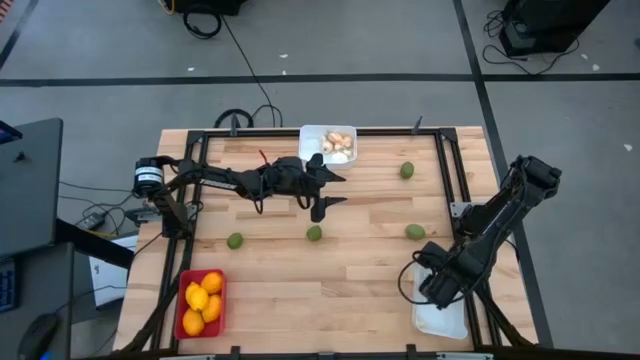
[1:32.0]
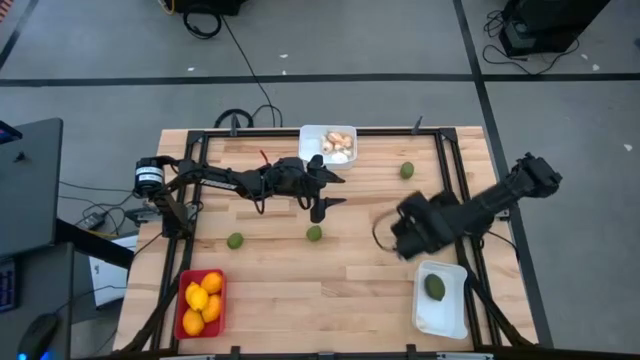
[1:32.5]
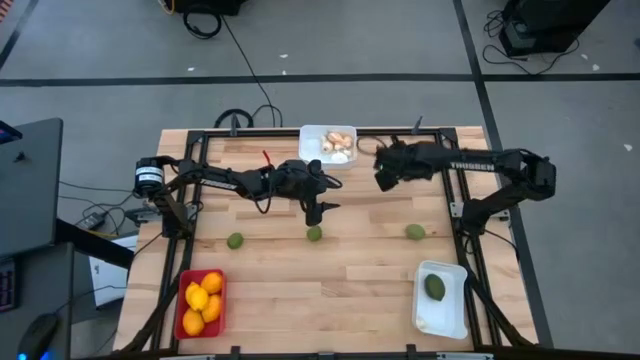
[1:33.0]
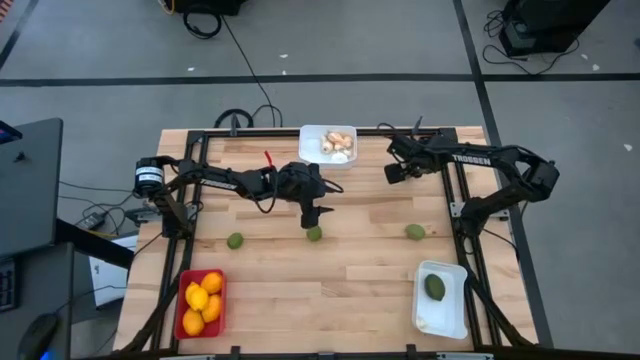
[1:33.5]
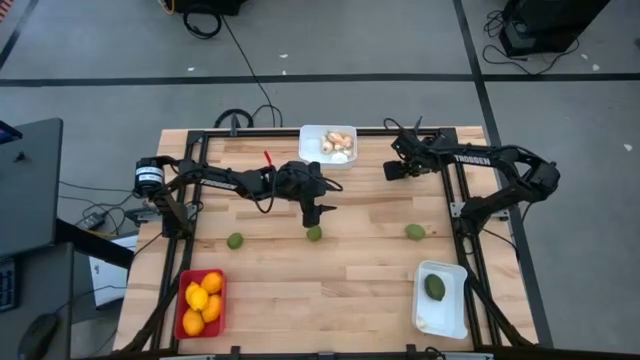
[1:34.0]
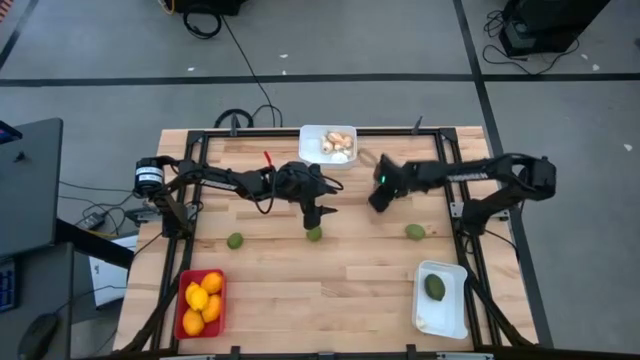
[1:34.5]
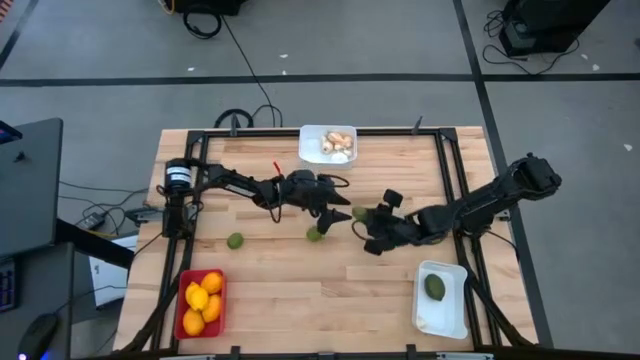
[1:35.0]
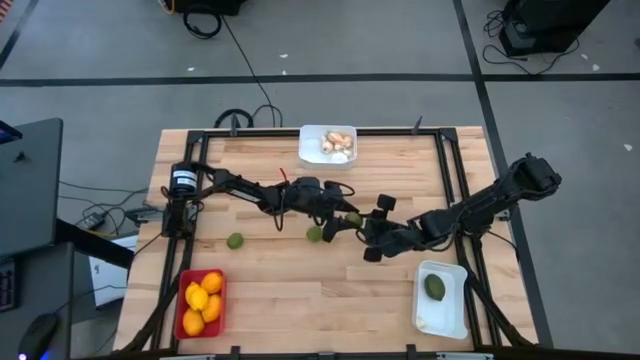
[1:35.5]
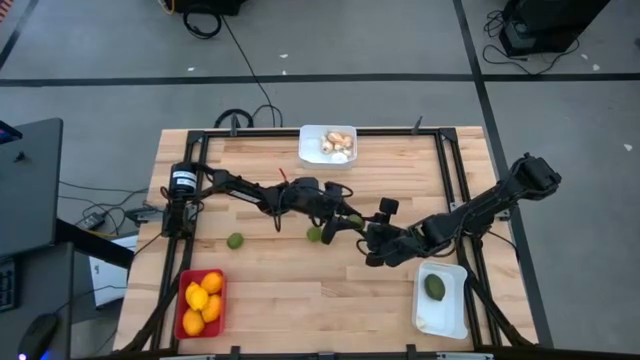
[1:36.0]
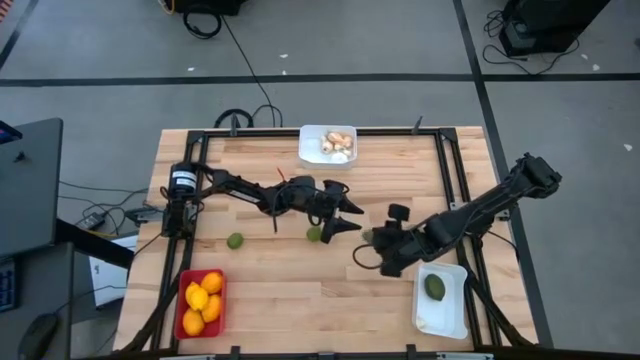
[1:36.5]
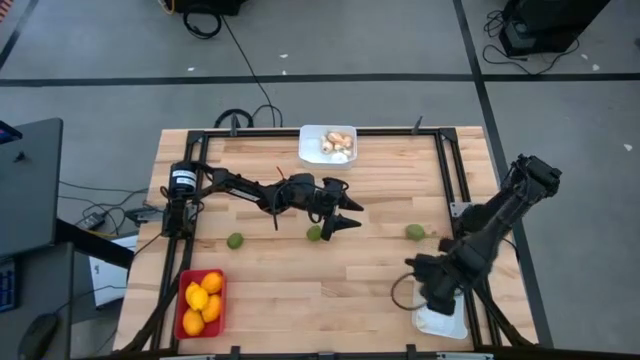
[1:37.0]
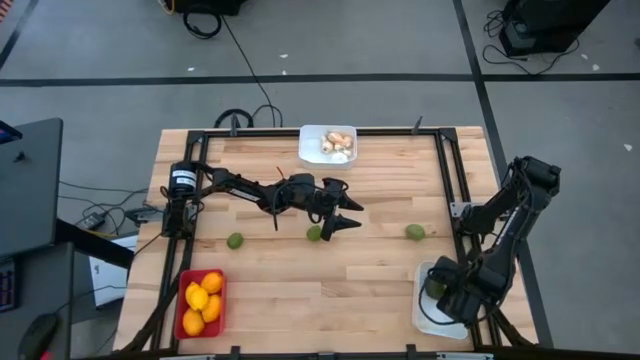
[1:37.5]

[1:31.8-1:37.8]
Task: Sort produce into baskets
Put the lime into the bottom white bin

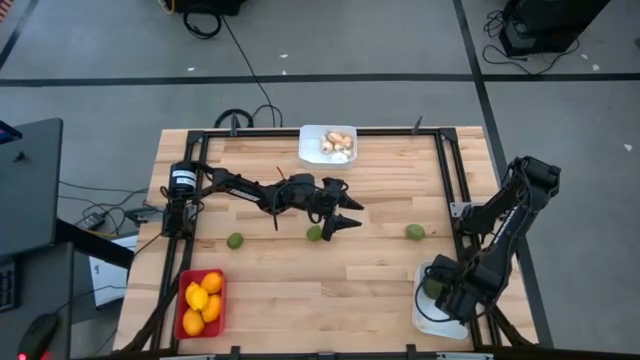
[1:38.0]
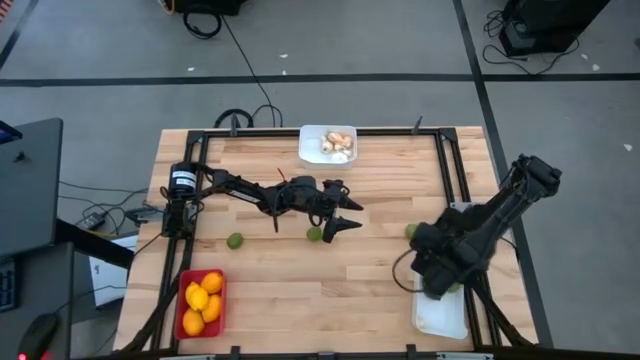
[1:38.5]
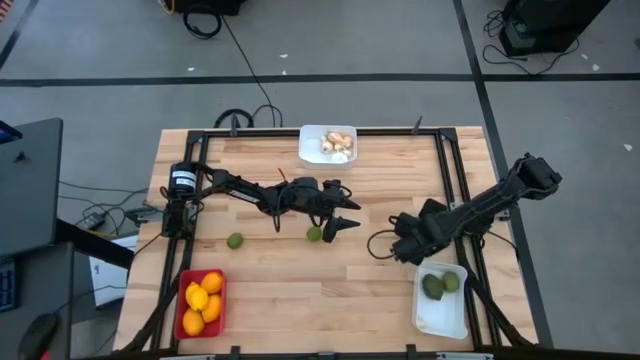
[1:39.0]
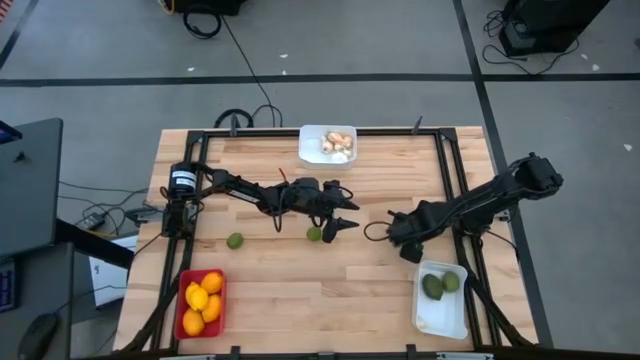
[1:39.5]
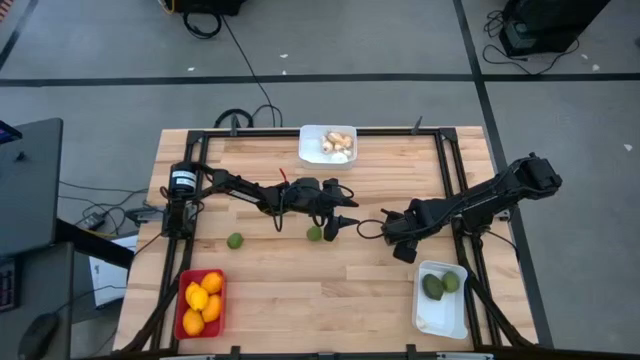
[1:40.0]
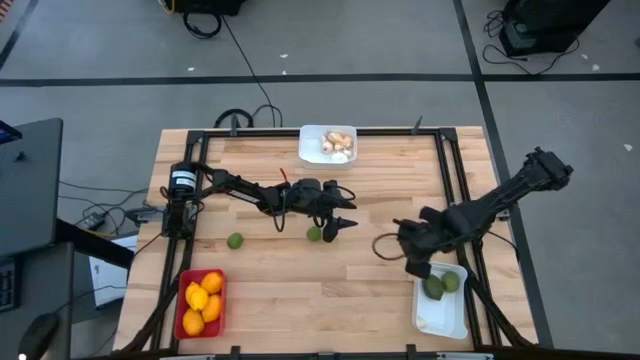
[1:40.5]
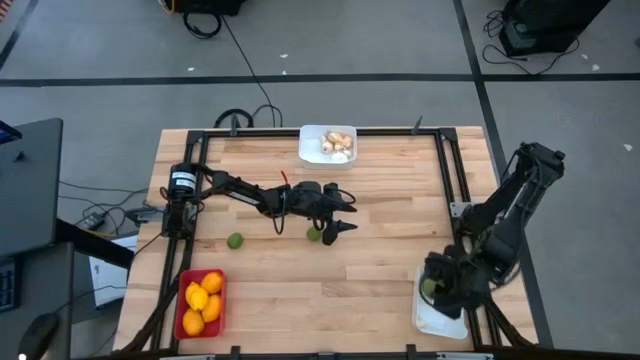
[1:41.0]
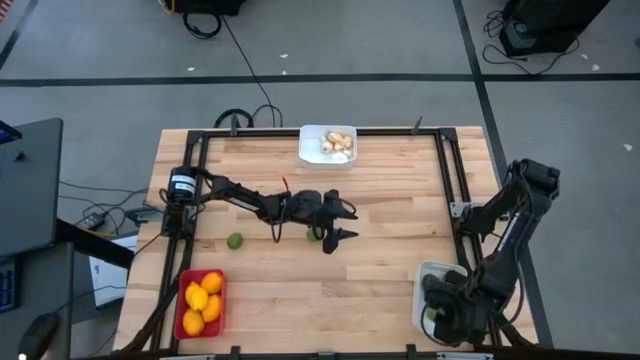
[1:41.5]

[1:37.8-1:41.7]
Put the lime into the bottom white bin

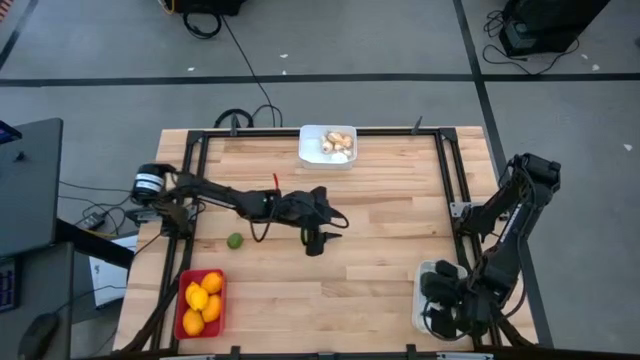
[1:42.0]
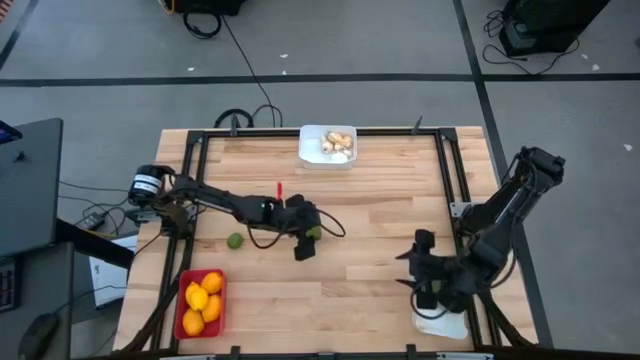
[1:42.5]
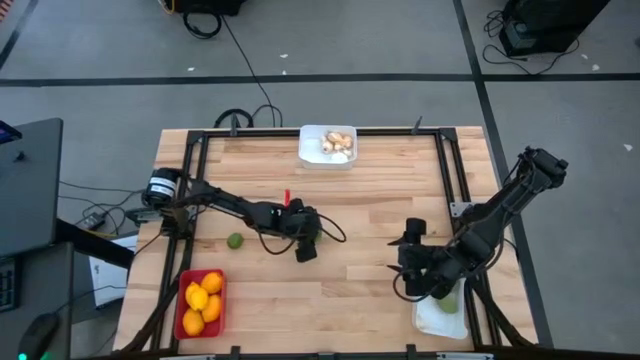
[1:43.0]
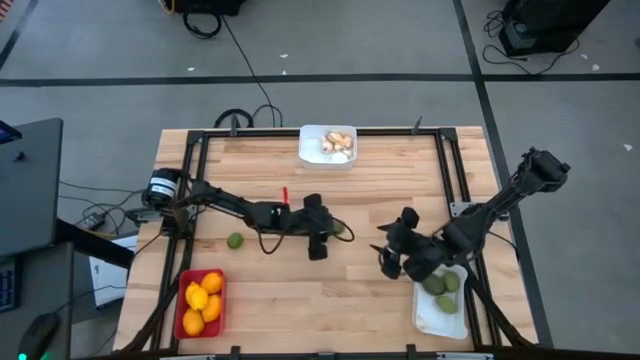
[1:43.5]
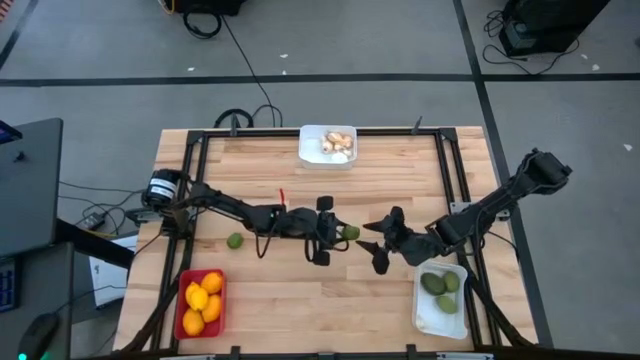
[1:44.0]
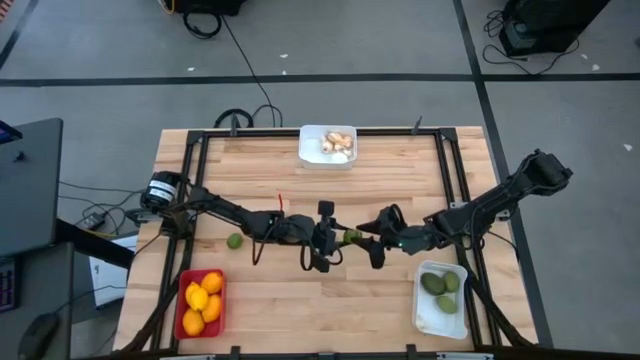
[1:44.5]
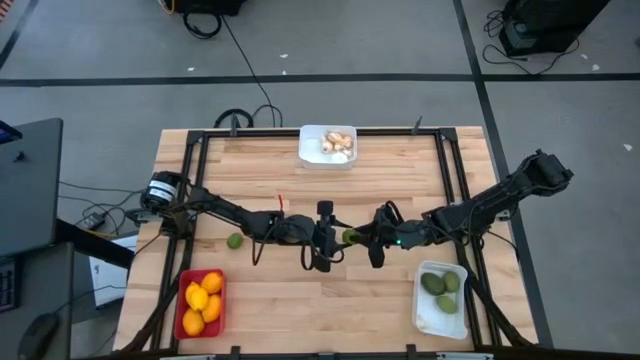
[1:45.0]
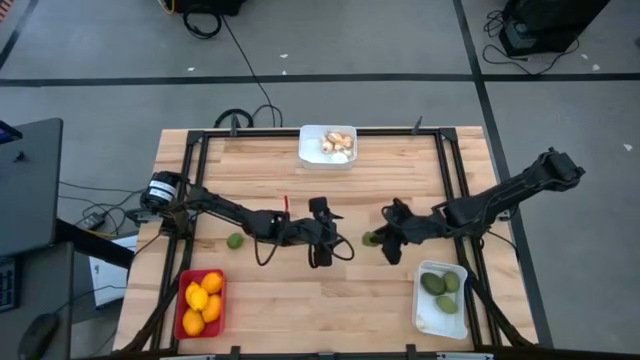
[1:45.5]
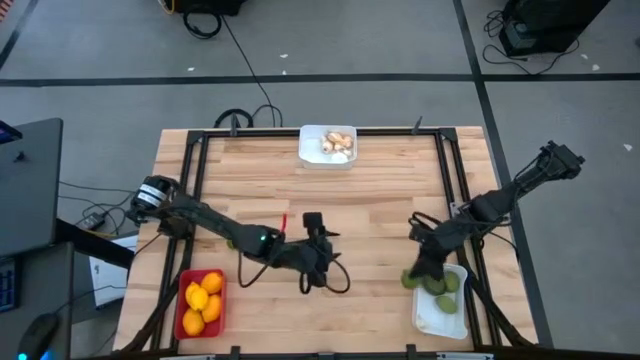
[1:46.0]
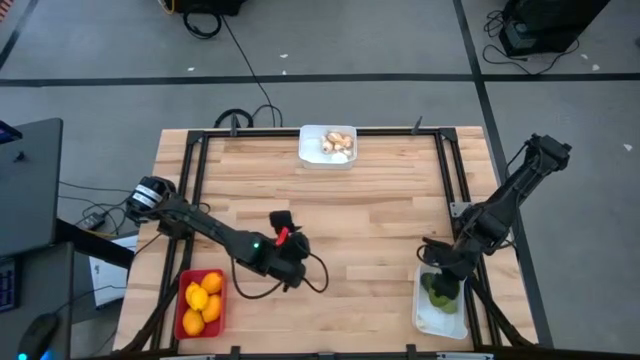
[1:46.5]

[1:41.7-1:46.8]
Put the lime into the bottom white bin

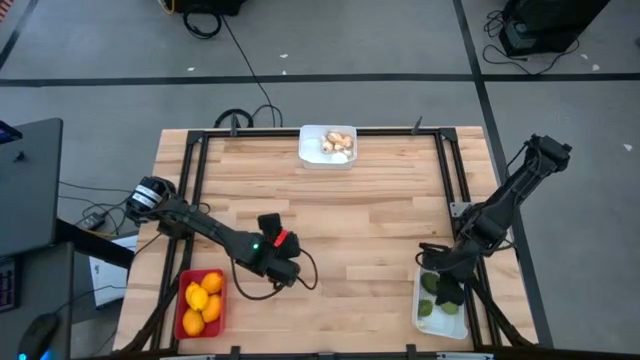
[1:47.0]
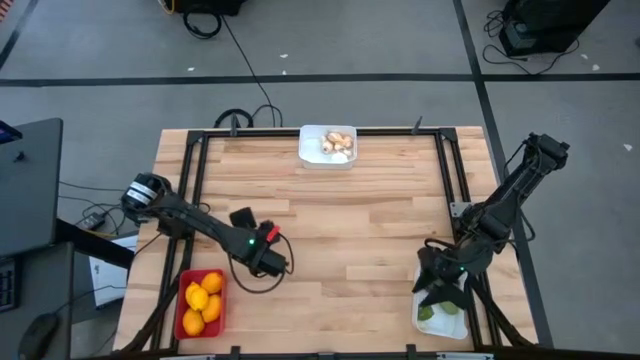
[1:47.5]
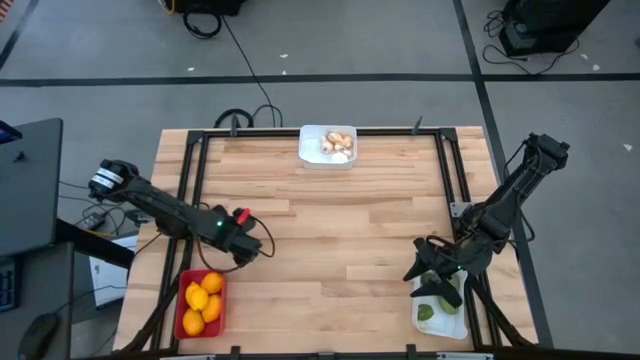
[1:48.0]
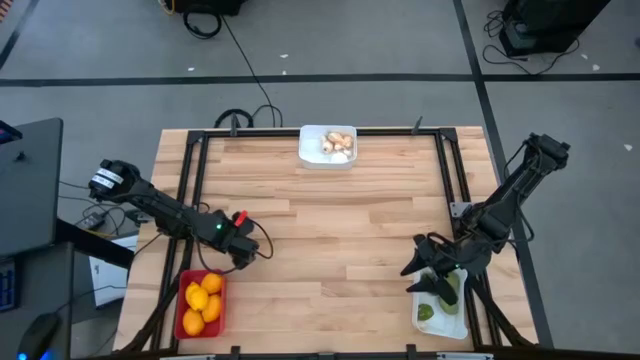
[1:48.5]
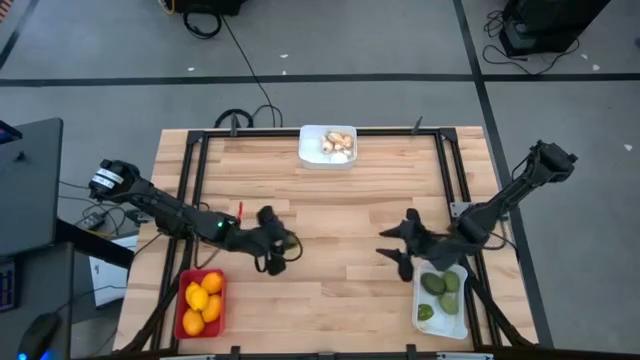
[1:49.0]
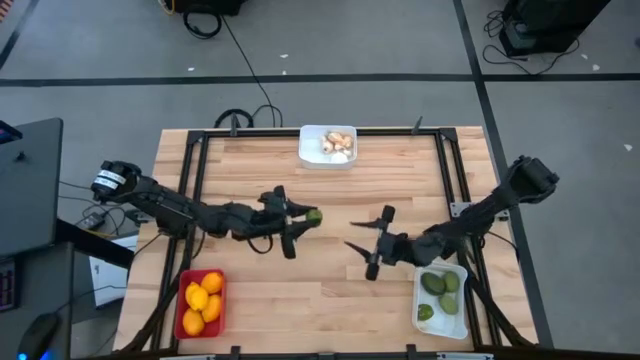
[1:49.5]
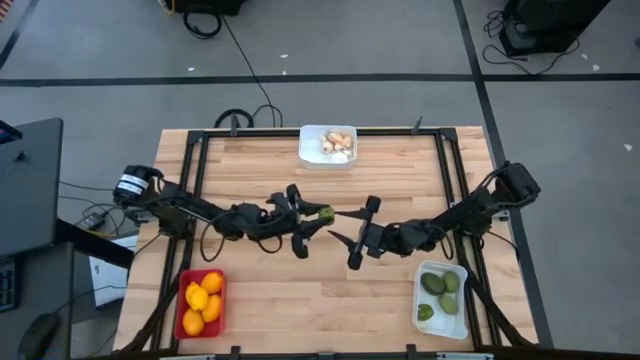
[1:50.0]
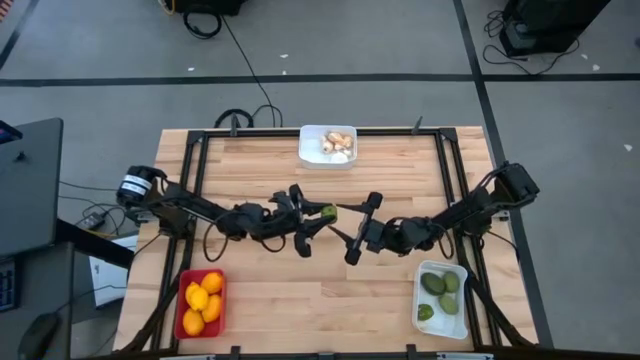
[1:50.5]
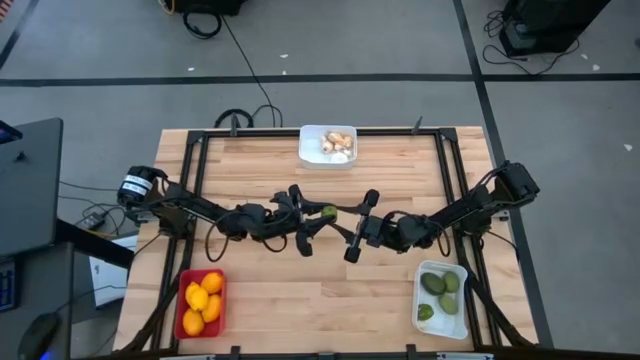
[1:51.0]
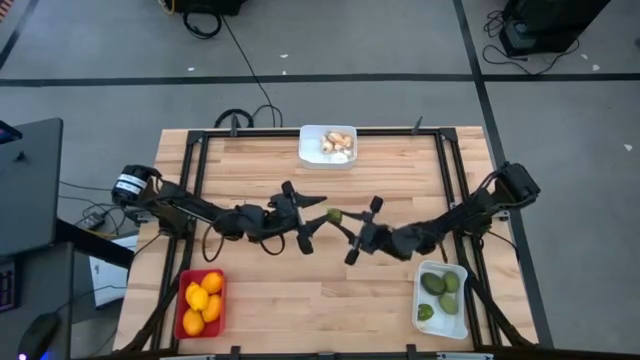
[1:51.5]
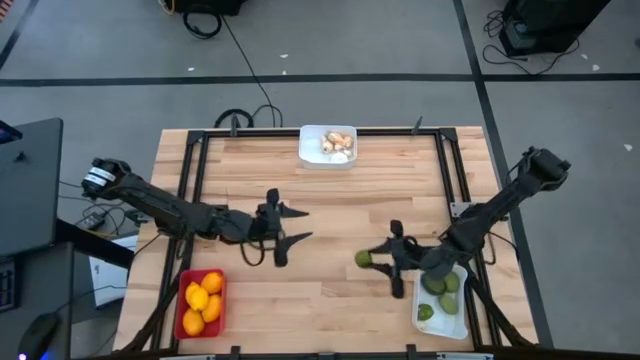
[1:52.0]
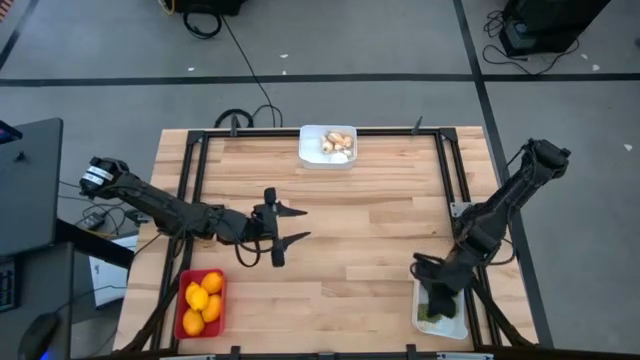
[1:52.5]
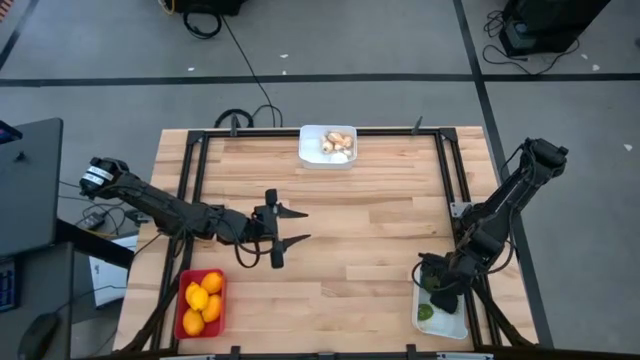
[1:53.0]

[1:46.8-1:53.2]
Put the lime into the bottom white bin
